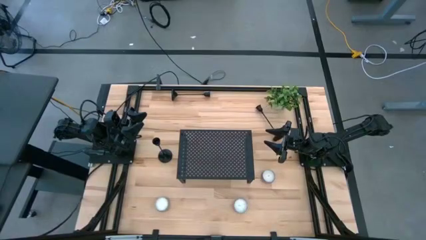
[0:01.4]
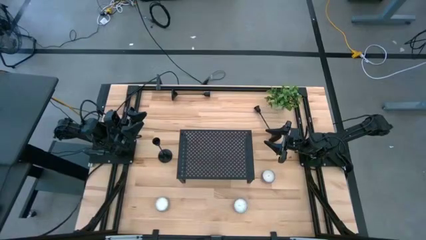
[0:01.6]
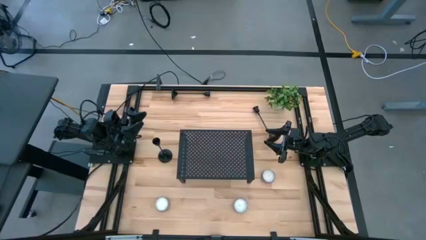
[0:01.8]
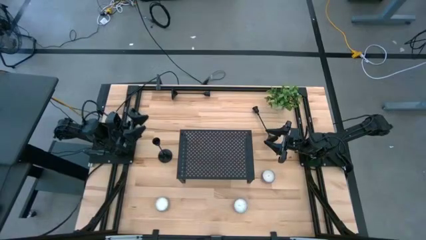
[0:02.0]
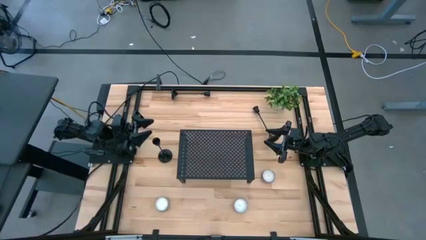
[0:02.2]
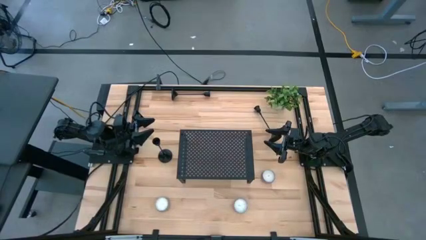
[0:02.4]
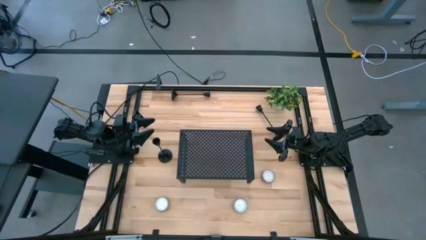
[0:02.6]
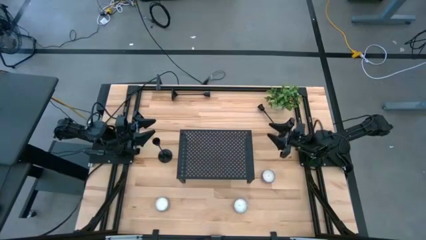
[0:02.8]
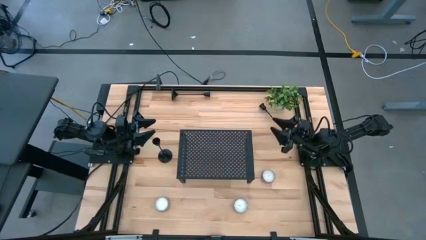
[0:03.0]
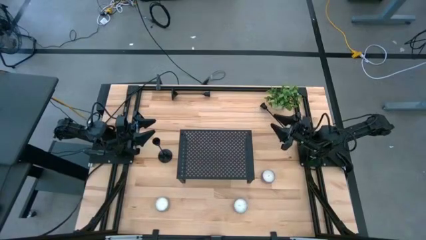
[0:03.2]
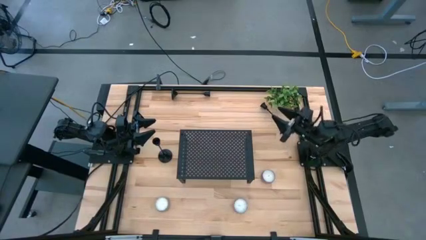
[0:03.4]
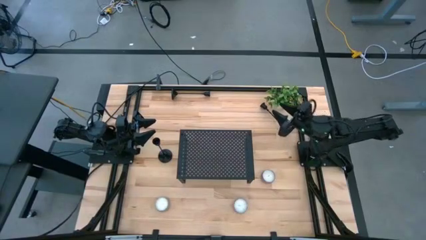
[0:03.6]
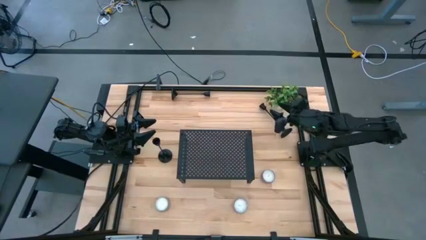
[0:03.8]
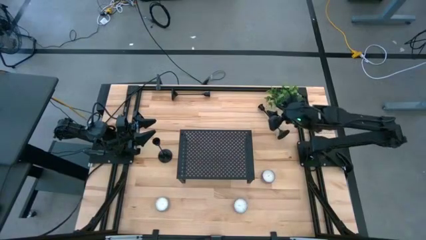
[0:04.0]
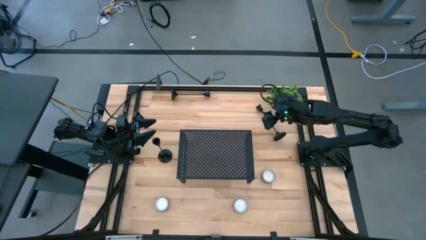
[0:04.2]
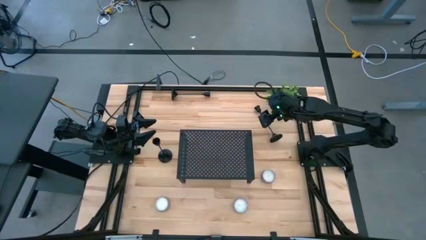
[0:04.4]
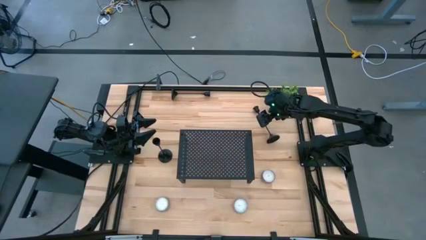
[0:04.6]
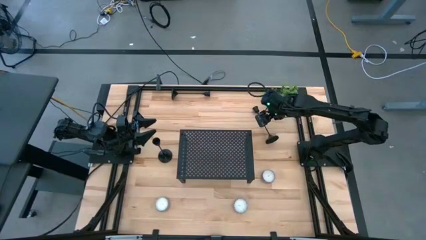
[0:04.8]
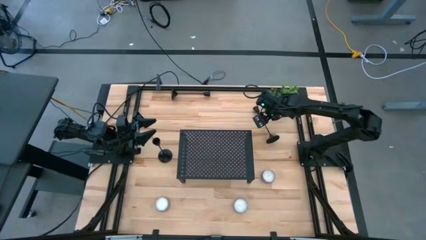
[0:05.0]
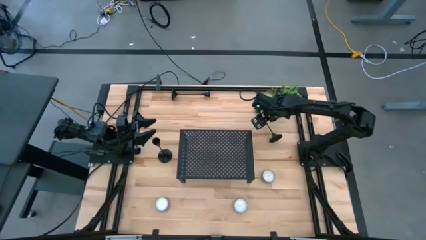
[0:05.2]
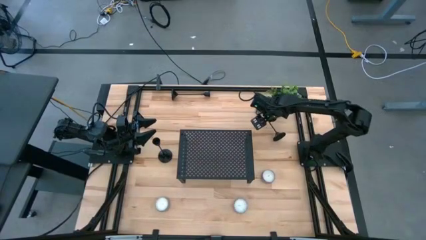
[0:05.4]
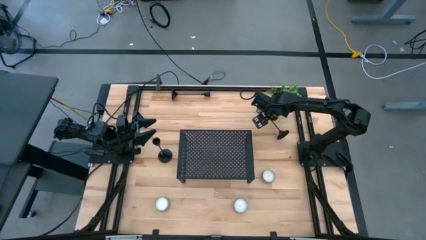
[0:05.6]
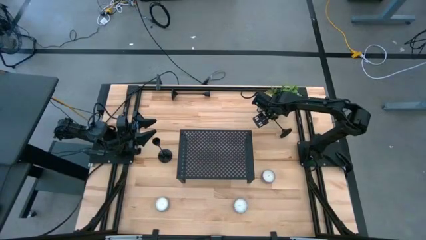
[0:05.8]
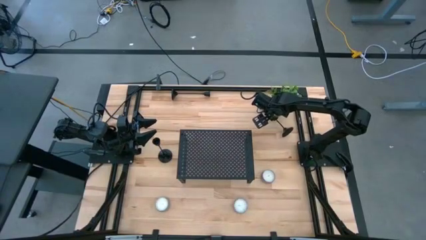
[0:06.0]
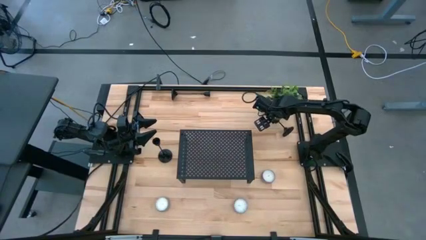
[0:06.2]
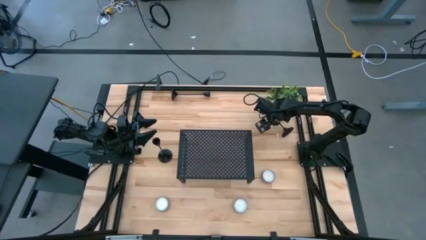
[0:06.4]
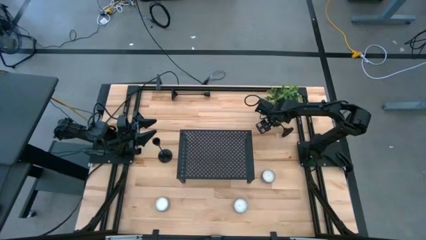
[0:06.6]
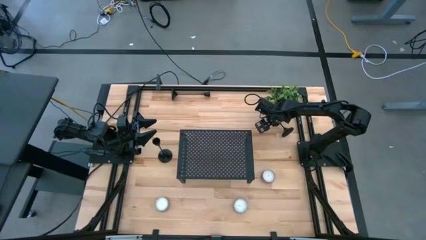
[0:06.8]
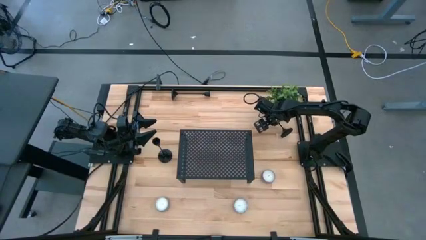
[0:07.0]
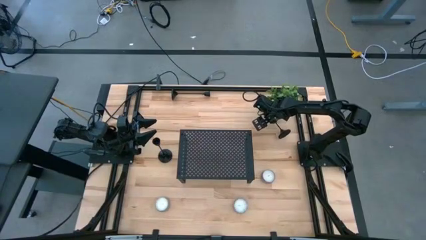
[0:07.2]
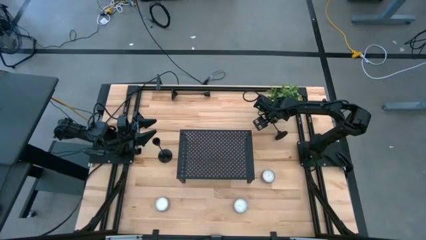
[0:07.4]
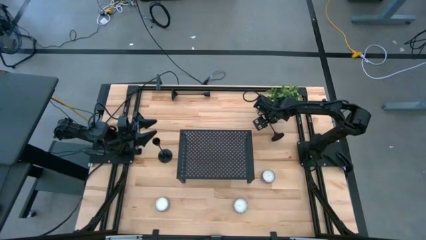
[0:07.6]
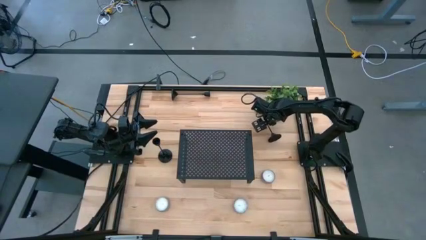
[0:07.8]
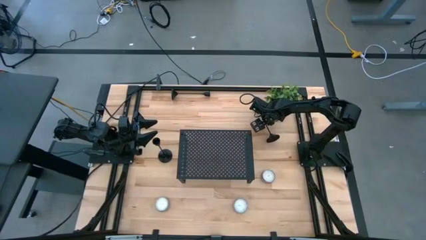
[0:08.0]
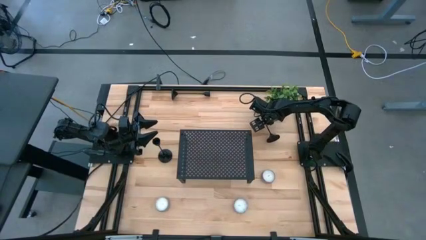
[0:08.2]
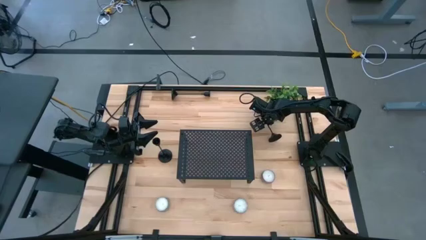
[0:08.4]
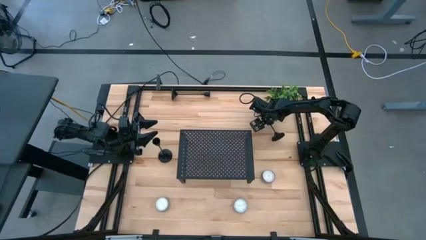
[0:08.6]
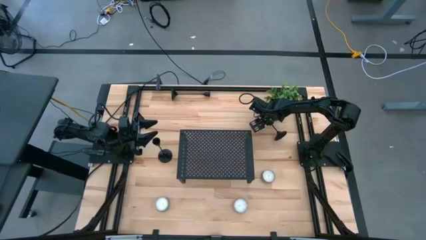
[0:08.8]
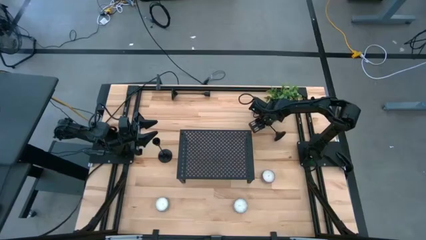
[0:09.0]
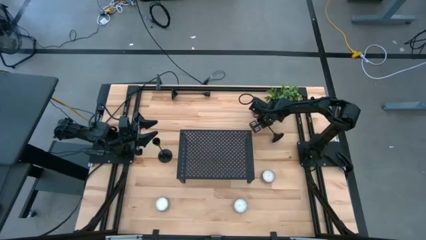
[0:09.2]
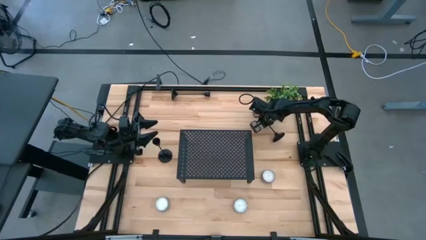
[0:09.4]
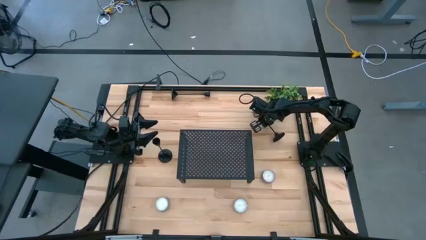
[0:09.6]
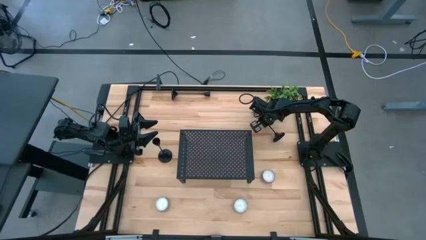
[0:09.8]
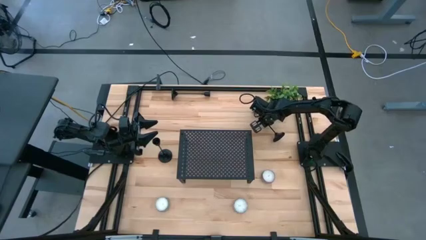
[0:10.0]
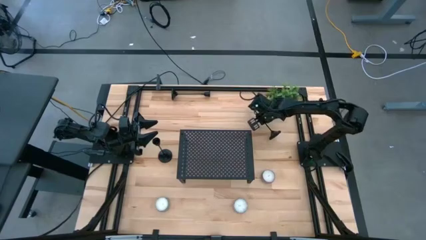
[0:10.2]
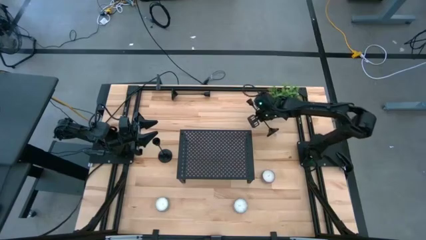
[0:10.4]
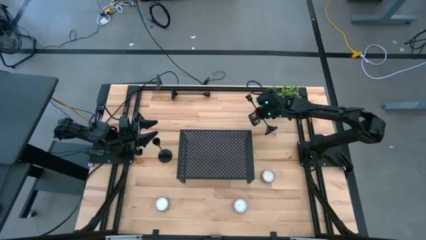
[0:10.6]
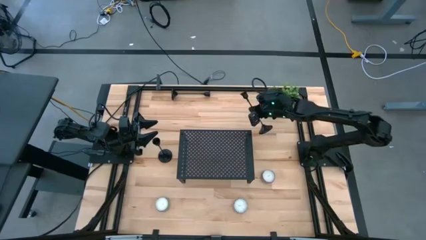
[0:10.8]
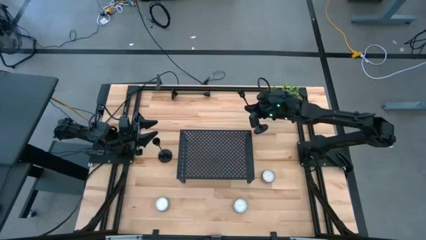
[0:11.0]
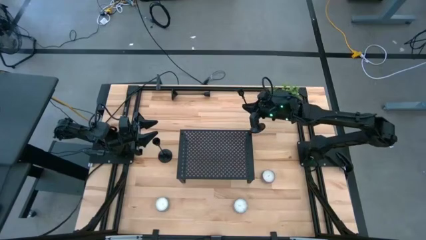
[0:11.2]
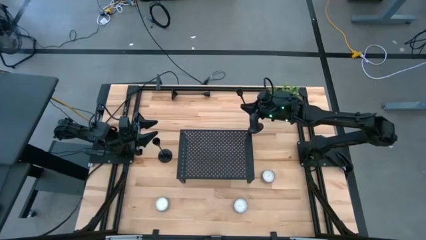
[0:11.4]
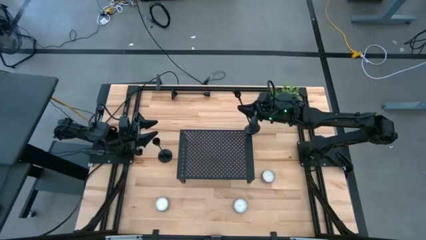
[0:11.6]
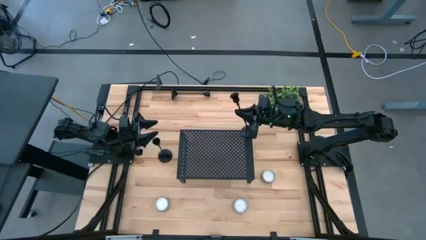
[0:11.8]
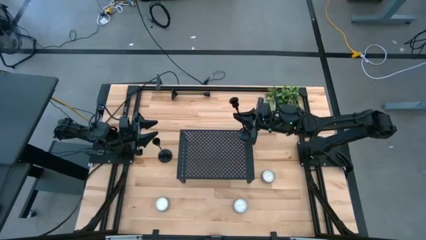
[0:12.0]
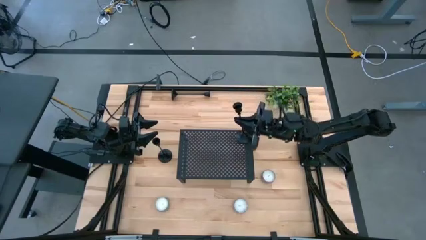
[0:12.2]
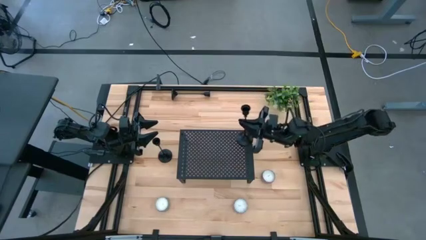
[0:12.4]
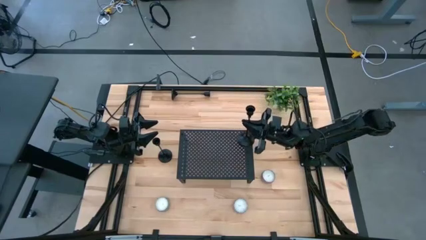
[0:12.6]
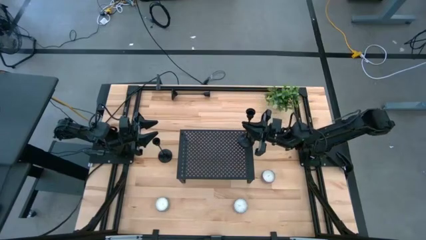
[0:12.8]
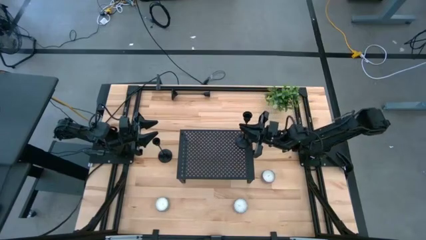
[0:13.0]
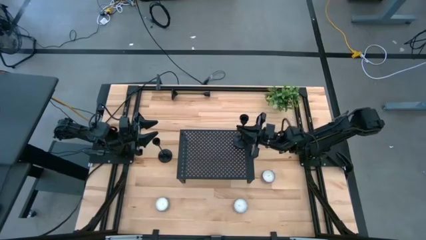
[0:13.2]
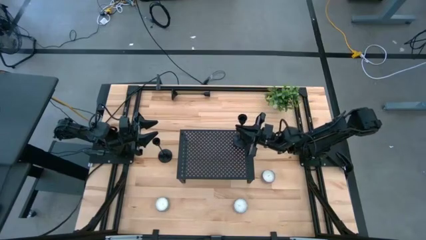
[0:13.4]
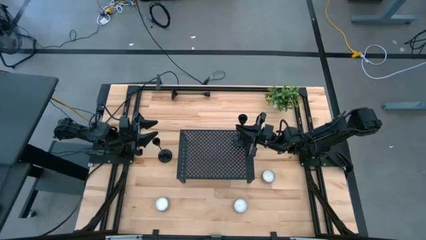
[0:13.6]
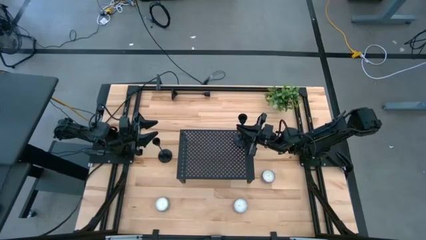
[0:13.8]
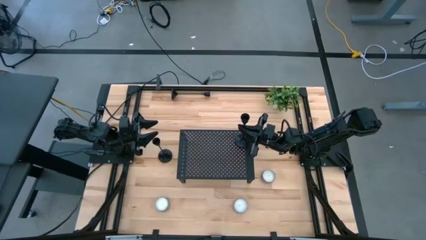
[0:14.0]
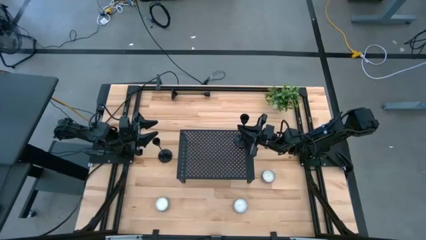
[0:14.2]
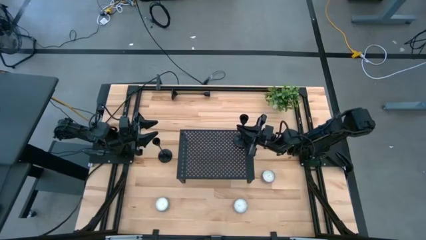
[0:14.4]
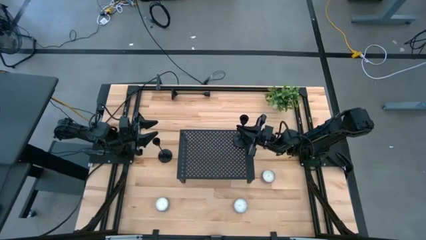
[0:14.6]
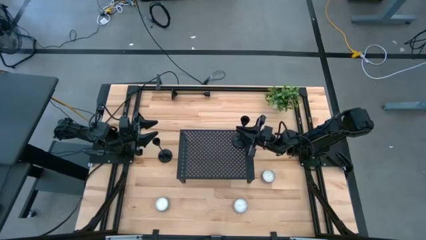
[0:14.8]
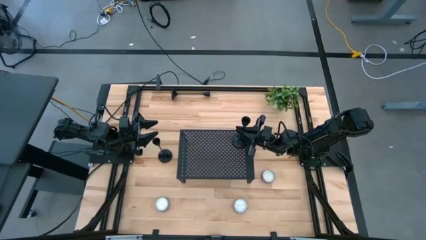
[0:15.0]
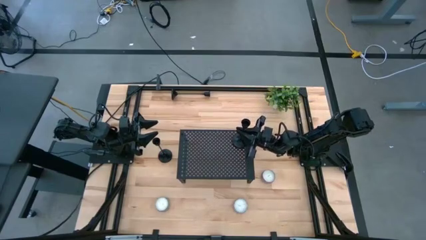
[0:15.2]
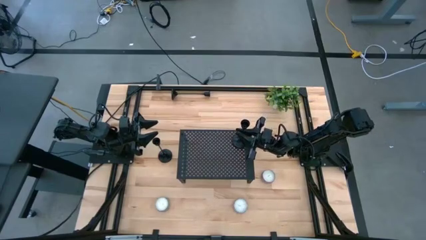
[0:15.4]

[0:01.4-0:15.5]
Task: Pick & Place candle stick holders
Put the middle right black candle holder on the shelf
